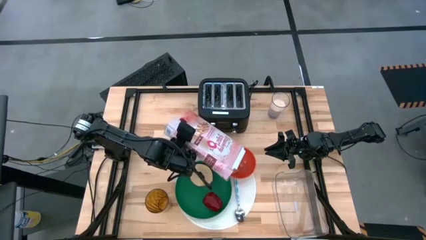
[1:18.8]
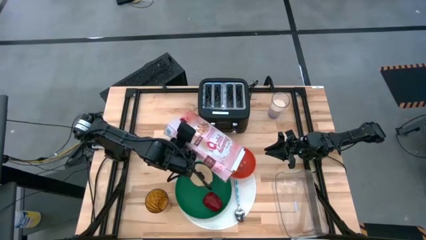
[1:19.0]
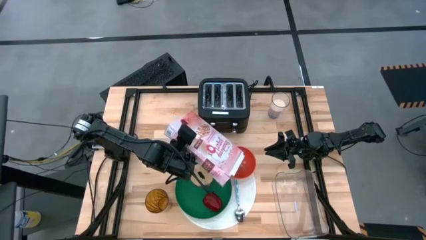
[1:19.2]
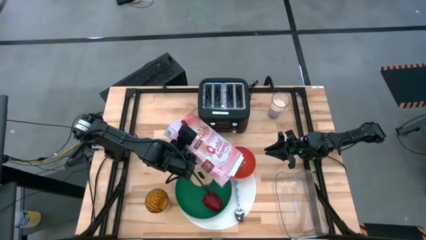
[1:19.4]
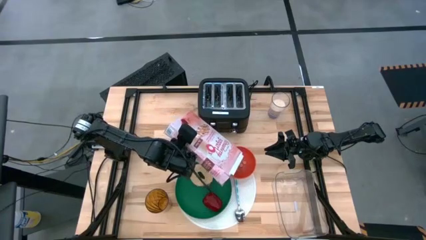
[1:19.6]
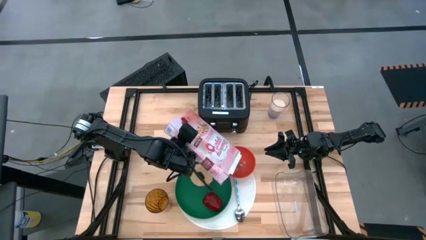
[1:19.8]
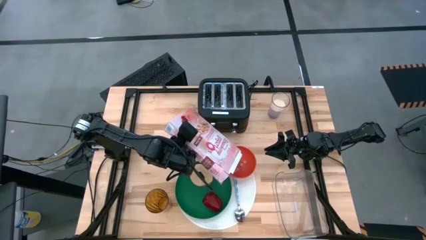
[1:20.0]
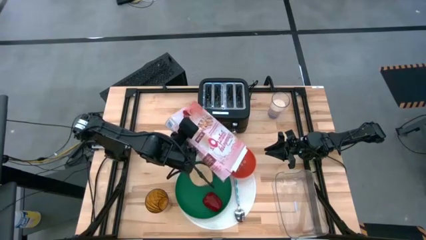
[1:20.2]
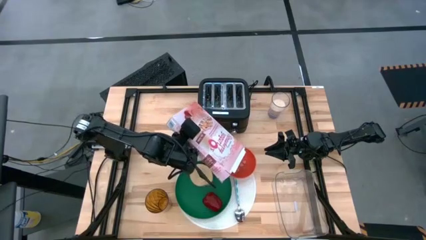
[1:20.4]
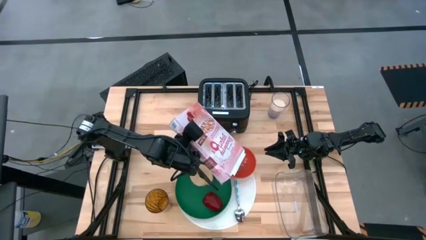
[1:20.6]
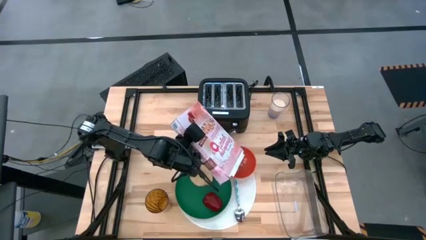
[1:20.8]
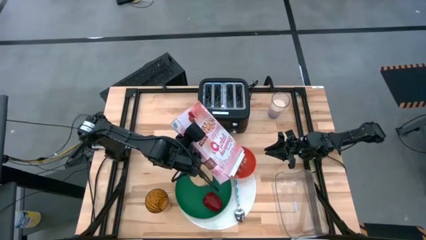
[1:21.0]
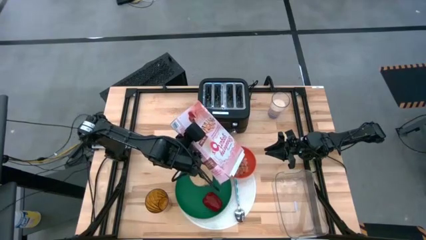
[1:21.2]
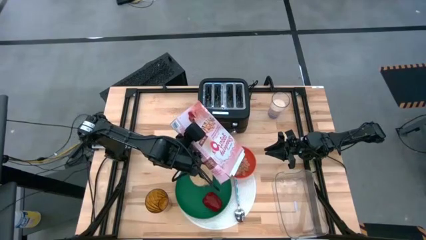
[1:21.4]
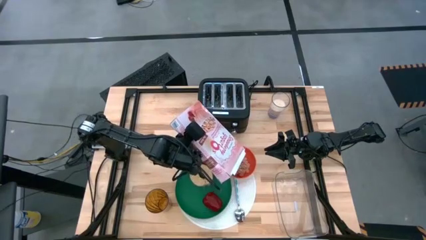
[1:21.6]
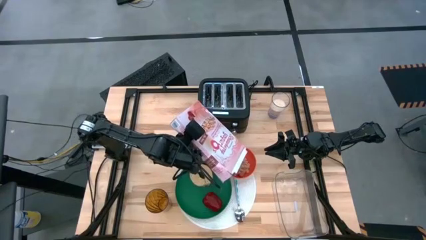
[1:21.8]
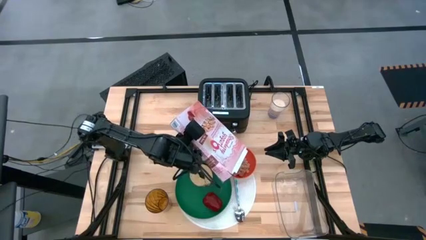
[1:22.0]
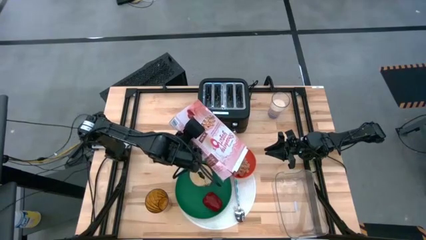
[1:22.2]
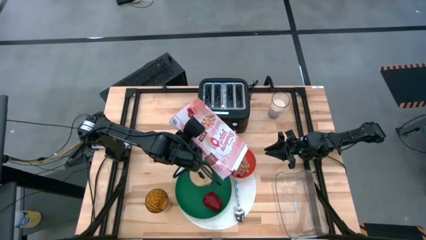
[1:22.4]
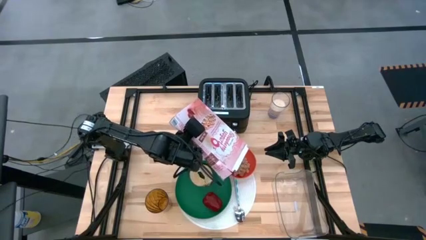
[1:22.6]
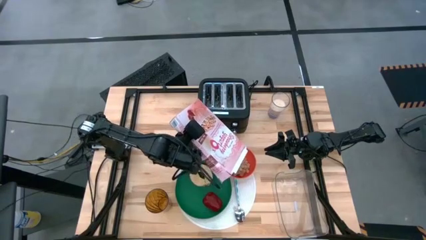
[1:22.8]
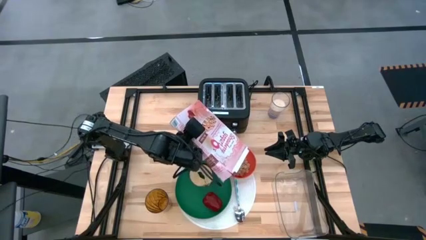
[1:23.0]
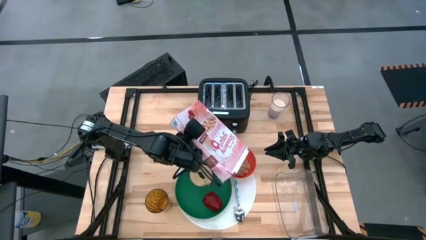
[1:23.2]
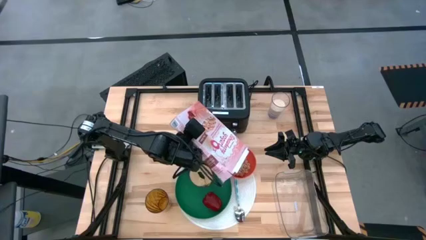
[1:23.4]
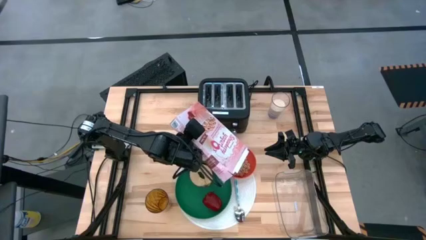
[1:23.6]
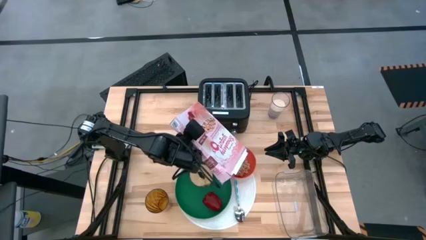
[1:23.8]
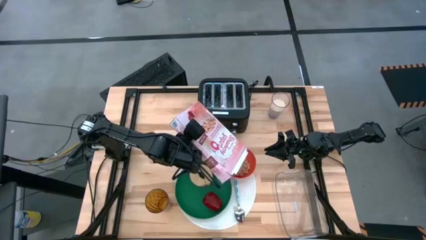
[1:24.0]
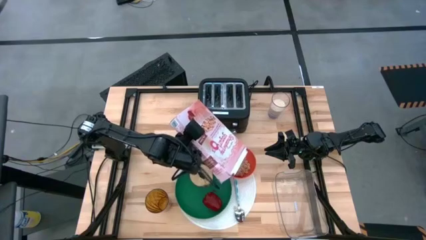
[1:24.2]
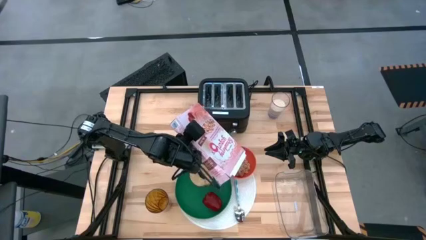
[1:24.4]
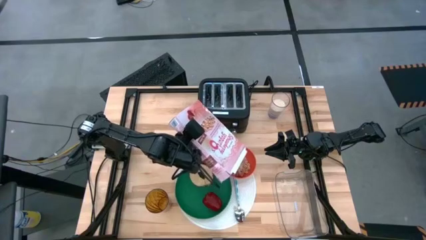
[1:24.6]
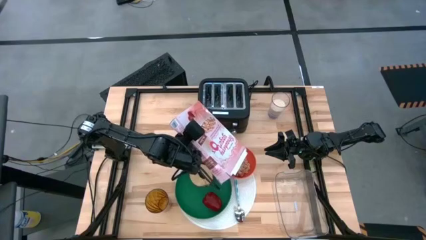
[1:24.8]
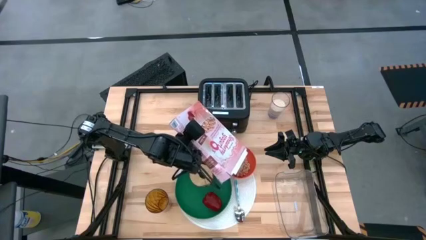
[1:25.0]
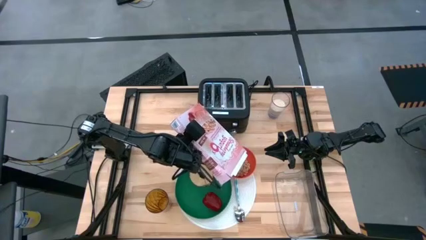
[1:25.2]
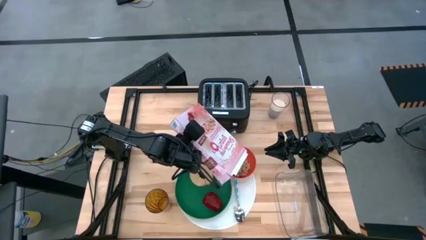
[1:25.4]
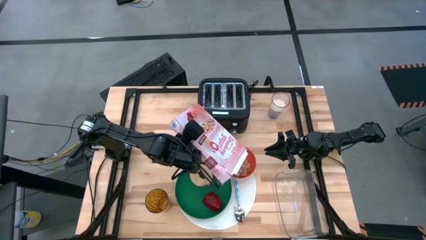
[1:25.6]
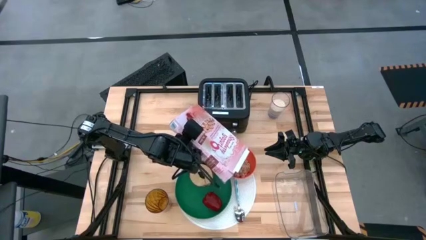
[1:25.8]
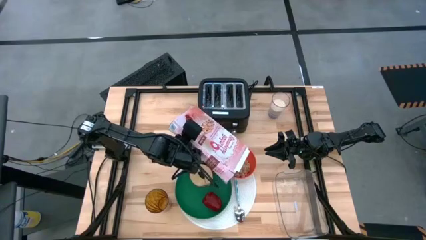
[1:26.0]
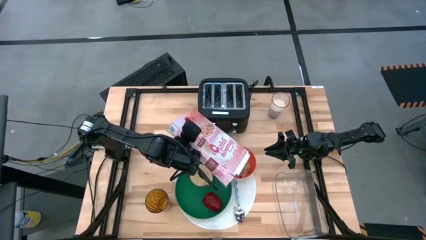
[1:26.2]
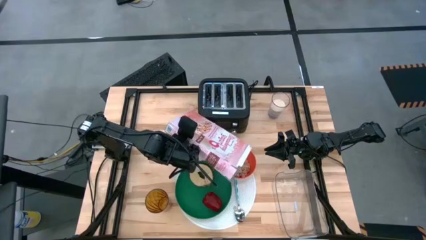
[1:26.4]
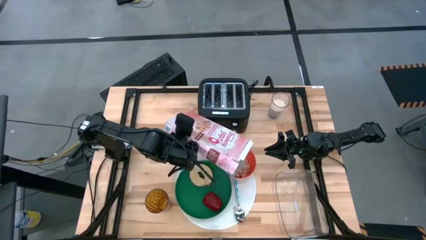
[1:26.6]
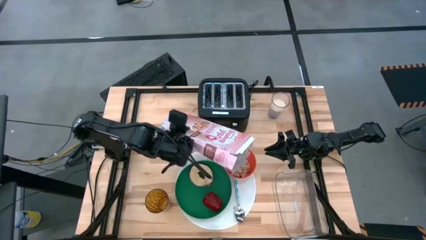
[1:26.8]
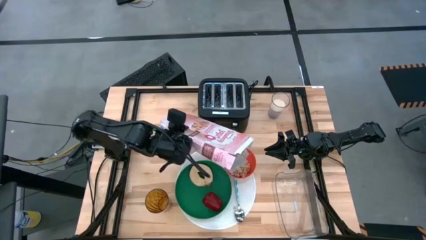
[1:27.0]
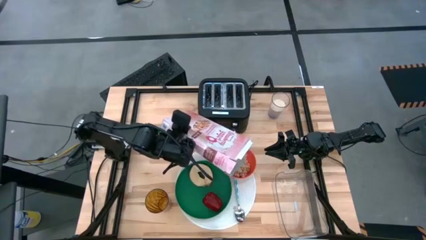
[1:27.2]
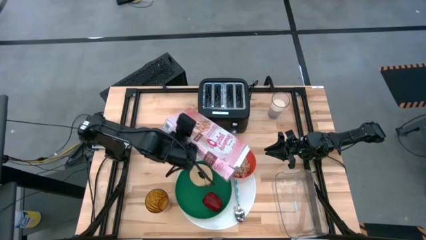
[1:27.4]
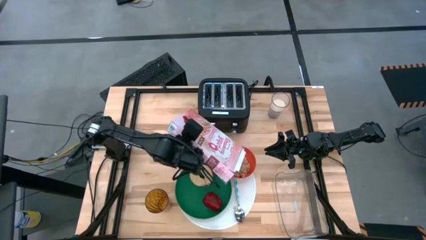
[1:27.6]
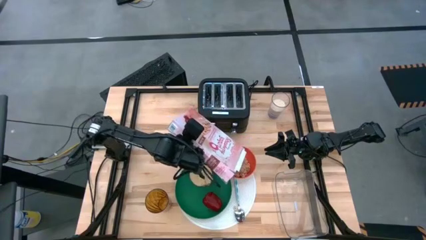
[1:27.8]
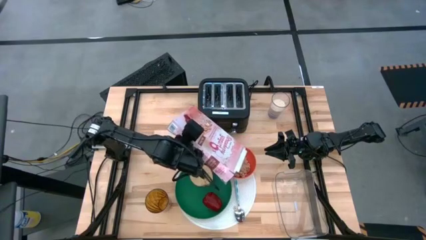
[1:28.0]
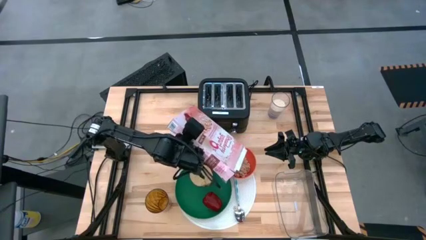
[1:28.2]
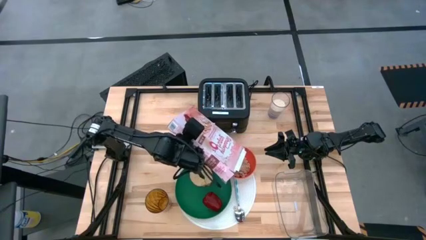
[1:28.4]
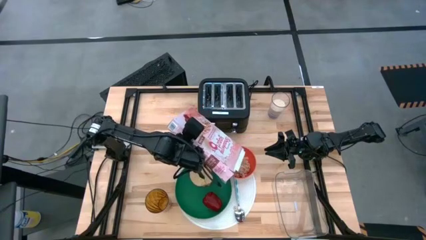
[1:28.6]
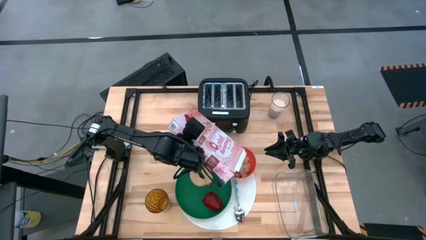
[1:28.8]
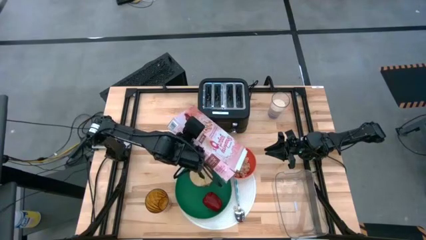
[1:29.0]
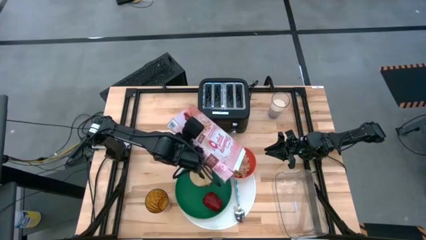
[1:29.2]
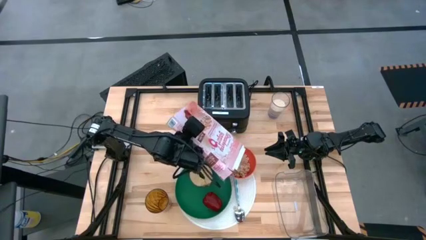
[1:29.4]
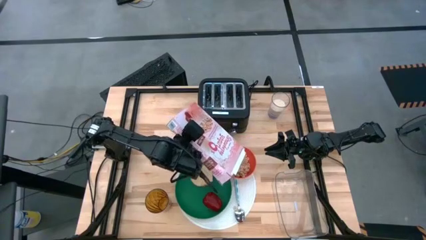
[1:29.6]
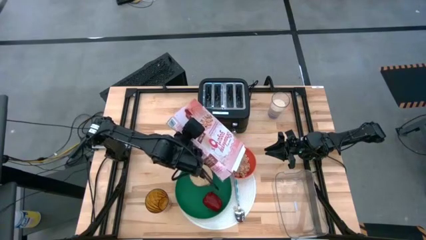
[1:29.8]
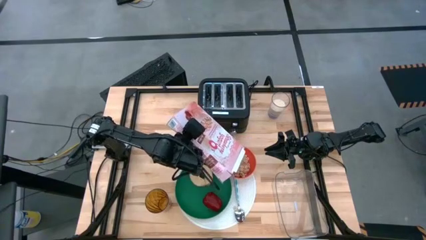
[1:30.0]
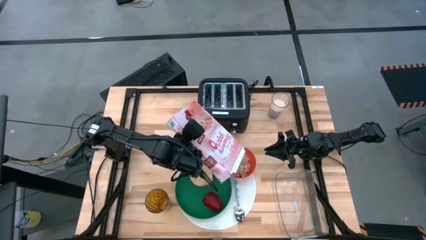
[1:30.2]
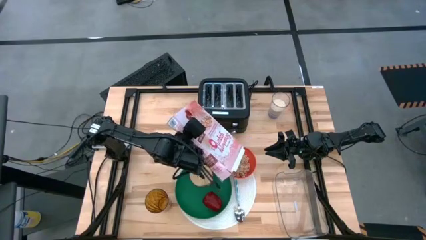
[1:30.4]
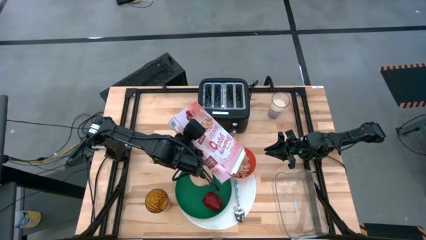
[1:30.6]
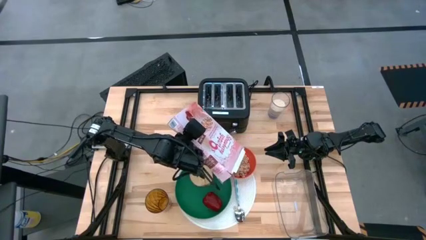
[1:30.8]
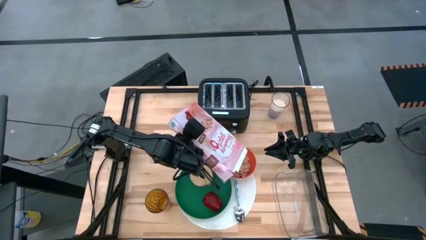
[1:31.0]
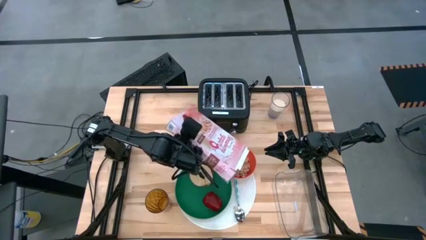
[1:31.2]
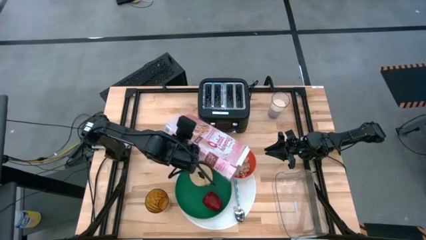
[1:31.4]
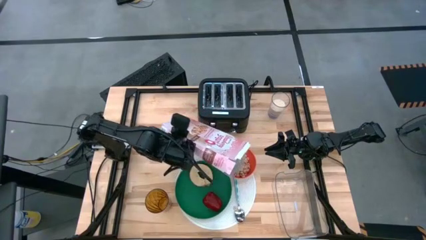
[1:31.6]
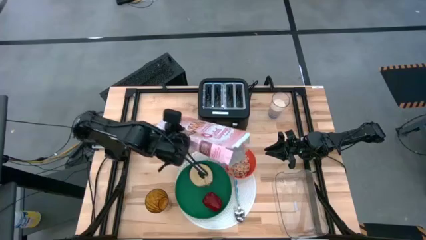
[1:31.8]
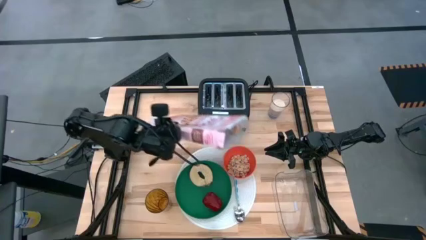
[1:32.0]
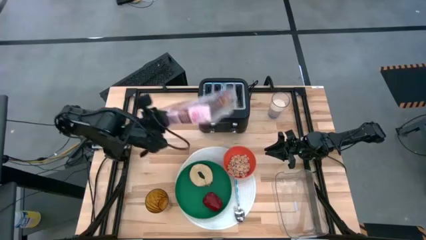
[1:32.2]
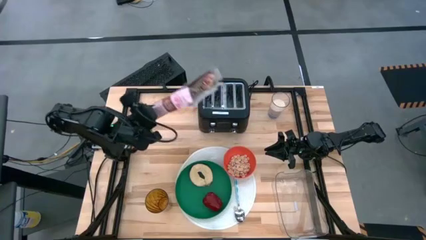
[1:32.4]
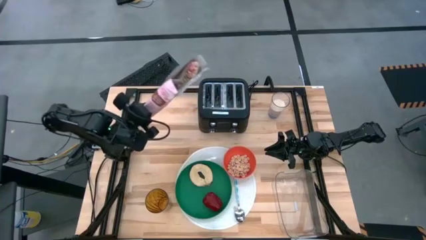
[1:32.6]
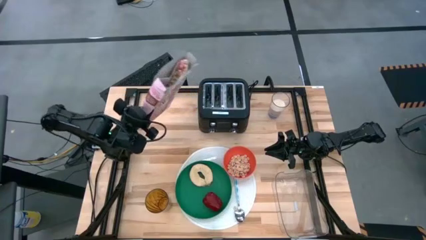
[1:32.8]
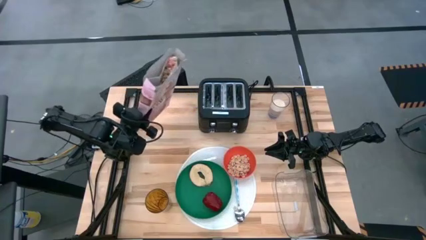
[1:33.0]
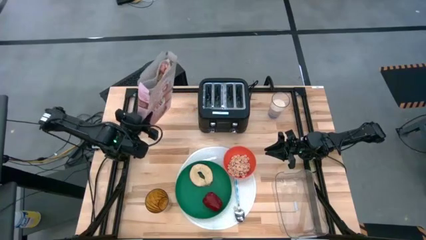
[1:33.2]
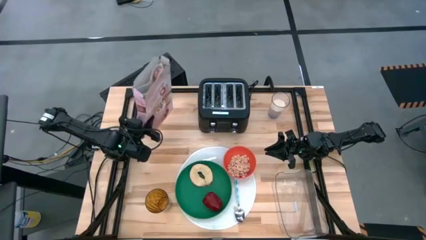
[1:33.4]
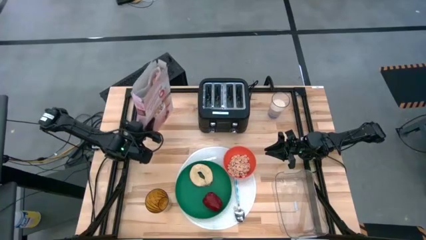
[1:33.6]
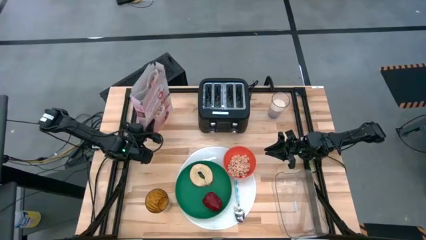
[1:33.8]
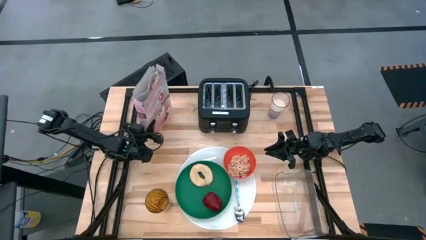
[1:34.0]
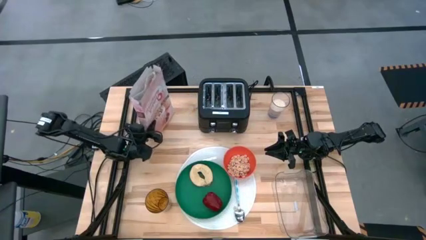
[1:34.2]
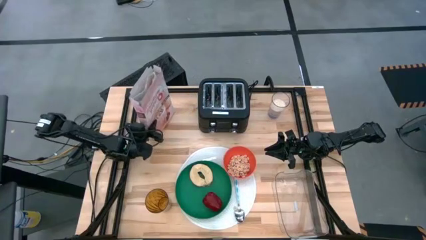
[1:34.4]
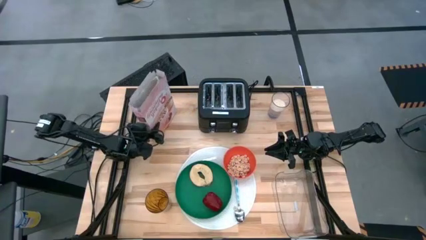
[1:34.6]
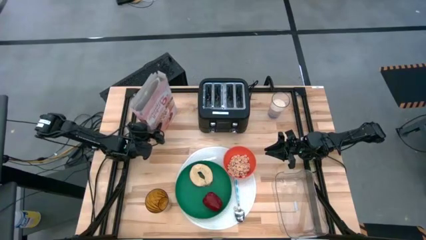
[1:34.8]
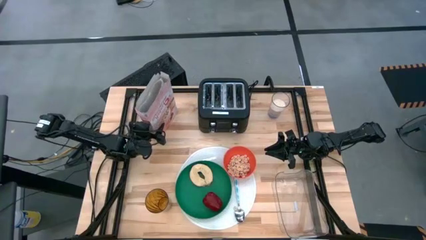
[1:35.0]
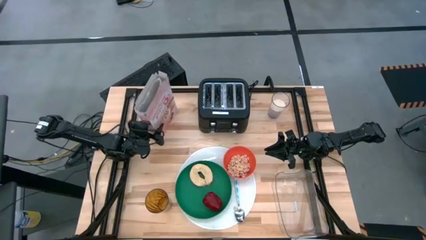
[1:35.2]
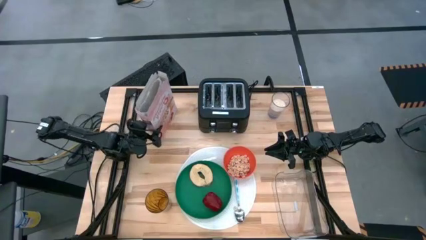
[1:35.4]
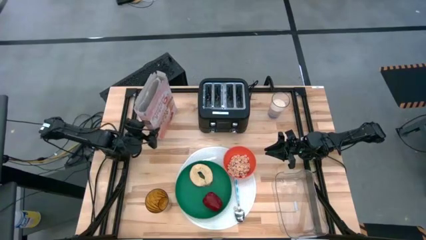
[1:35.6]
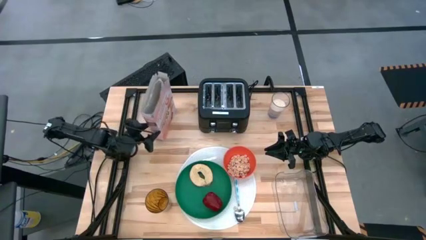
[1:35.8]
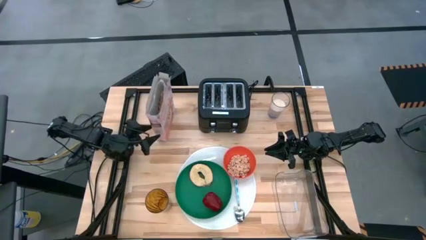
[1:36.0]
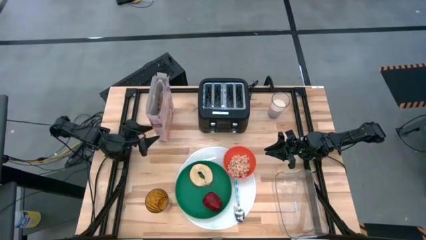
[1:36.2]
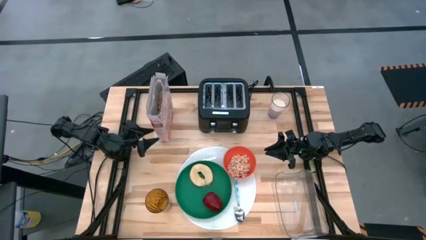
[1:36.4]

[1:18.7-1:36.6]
Task: Arrange a breakfast setting
Pour the cereal from the cereal box into the orange bowl
